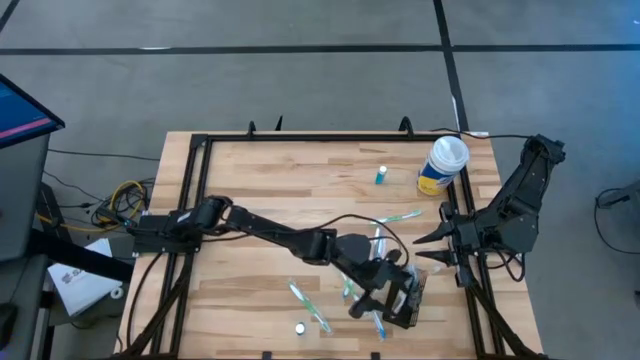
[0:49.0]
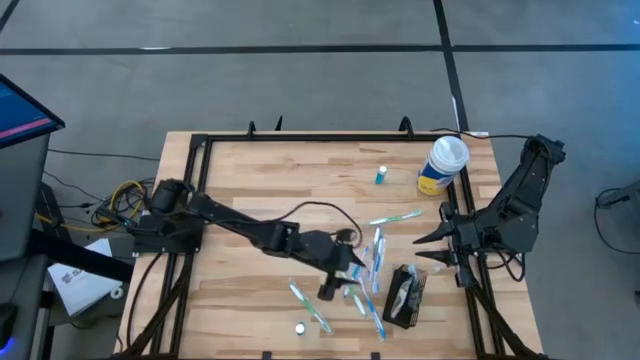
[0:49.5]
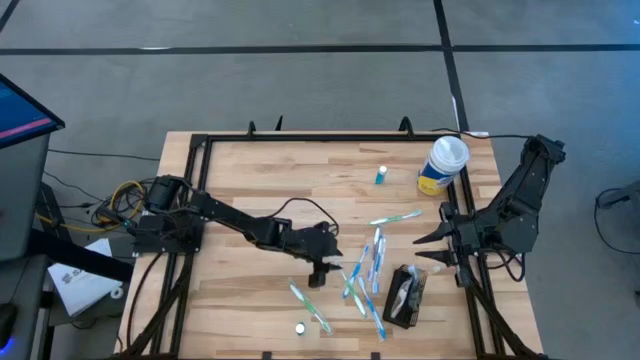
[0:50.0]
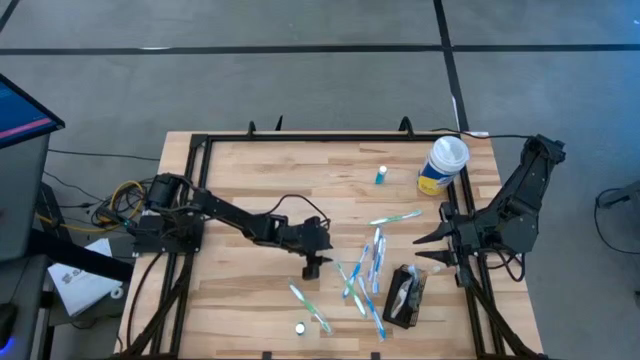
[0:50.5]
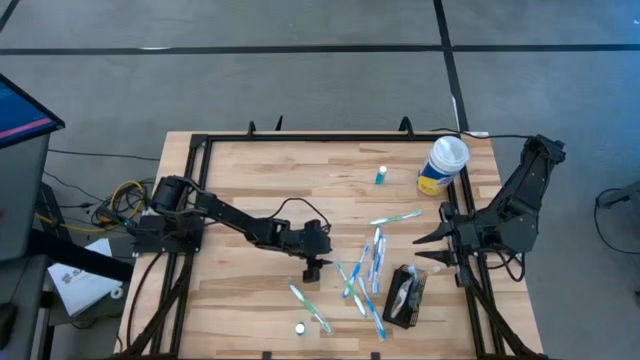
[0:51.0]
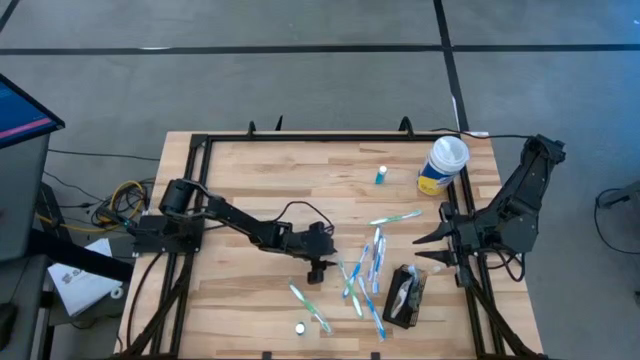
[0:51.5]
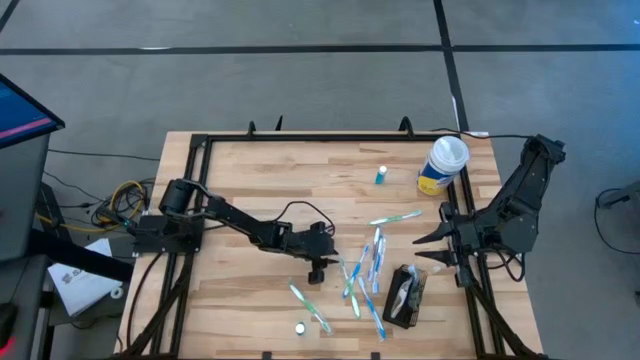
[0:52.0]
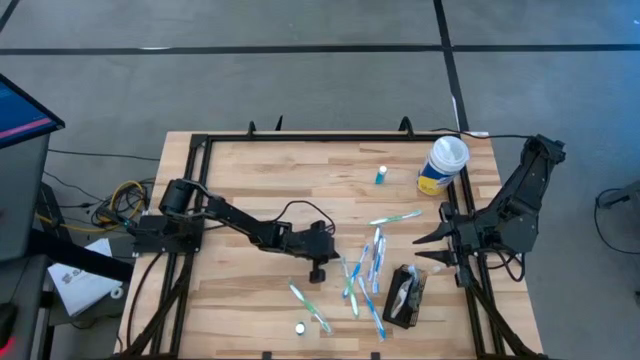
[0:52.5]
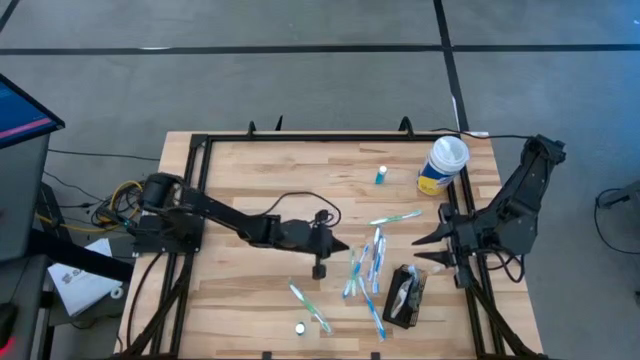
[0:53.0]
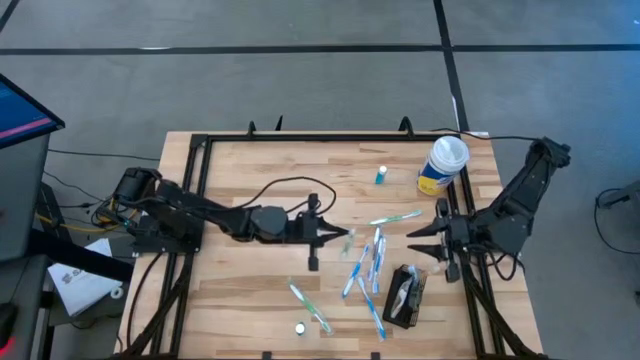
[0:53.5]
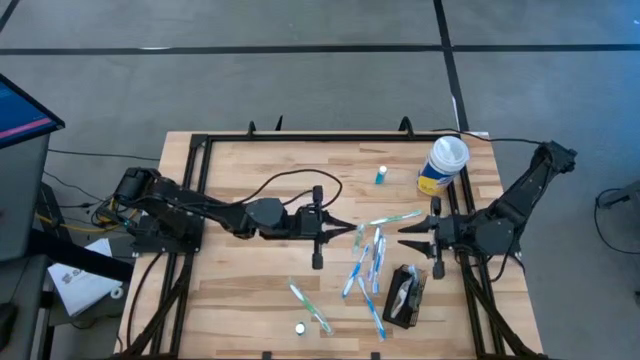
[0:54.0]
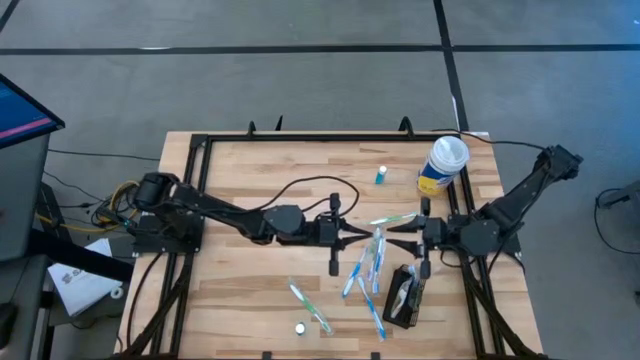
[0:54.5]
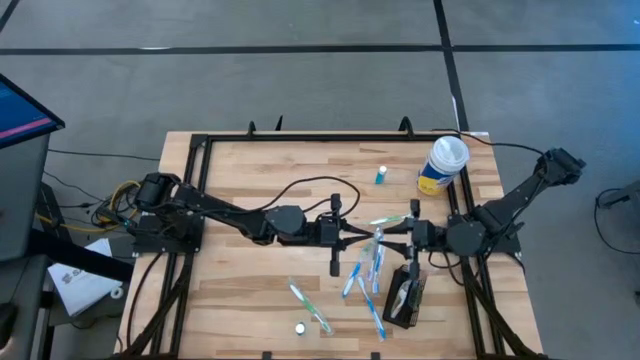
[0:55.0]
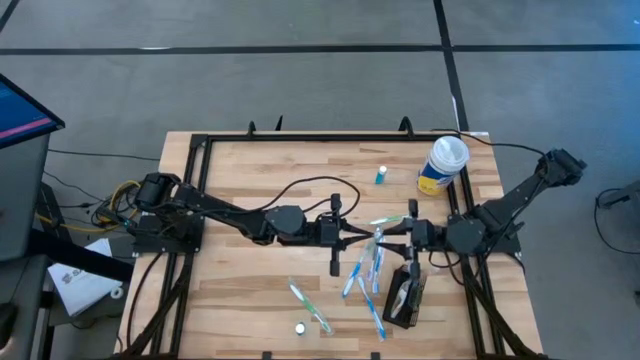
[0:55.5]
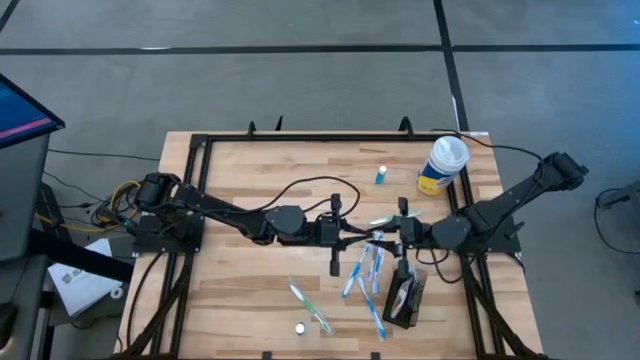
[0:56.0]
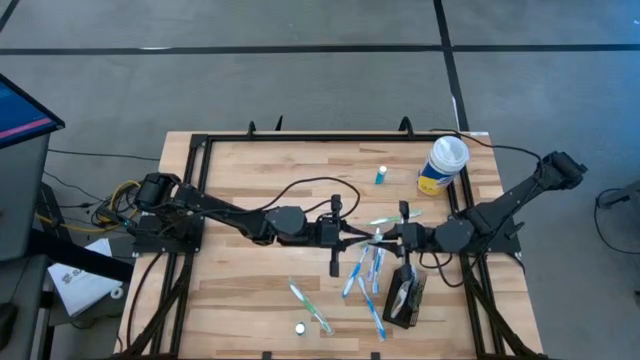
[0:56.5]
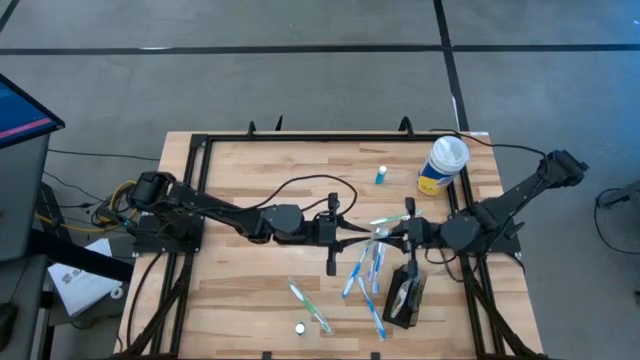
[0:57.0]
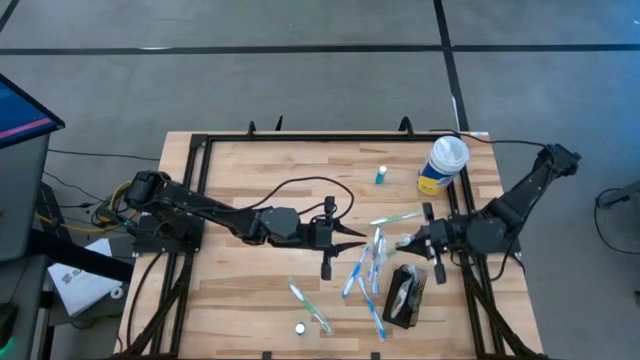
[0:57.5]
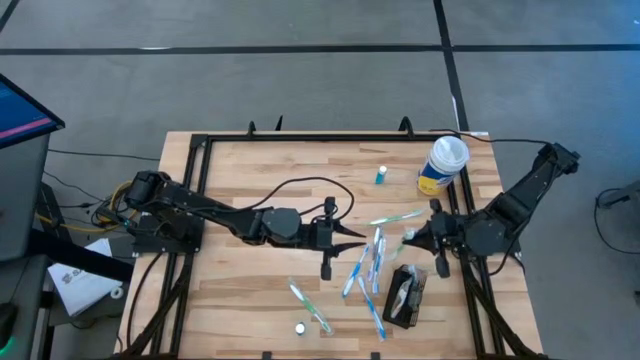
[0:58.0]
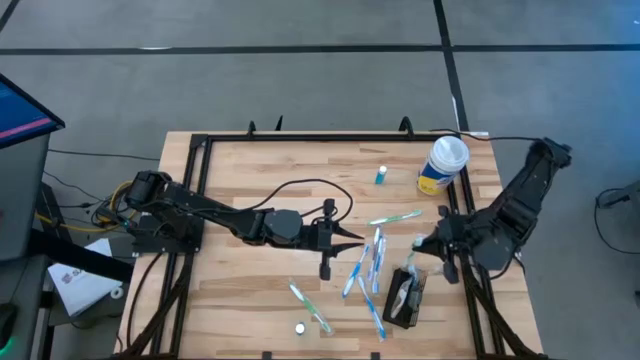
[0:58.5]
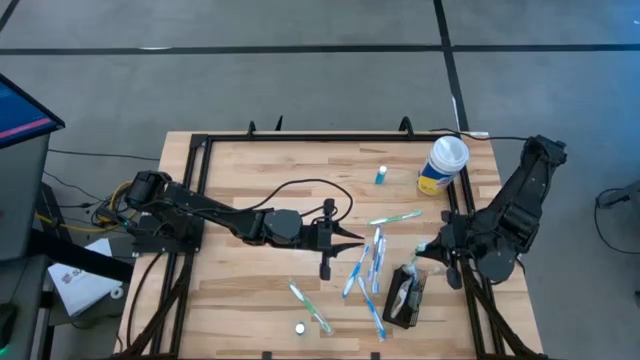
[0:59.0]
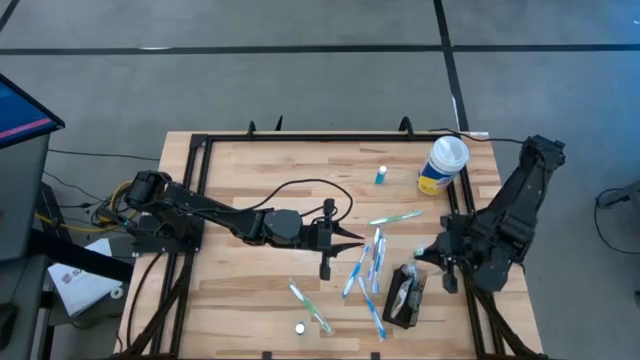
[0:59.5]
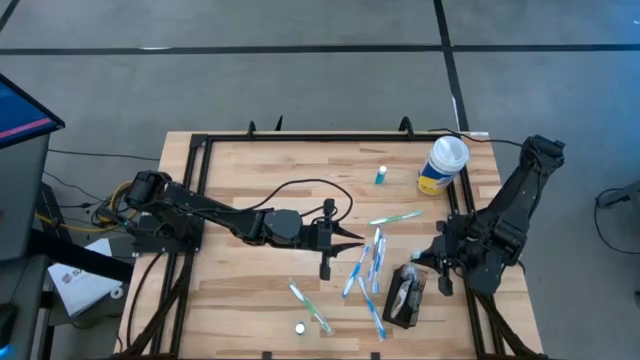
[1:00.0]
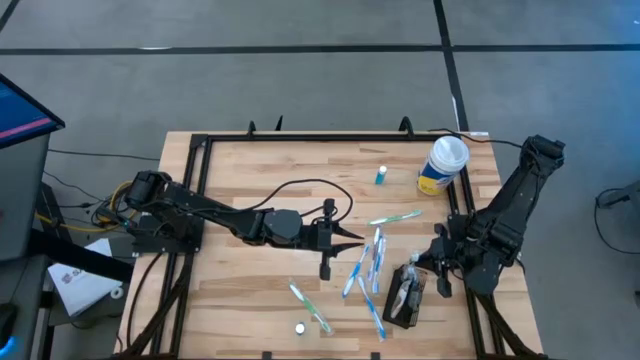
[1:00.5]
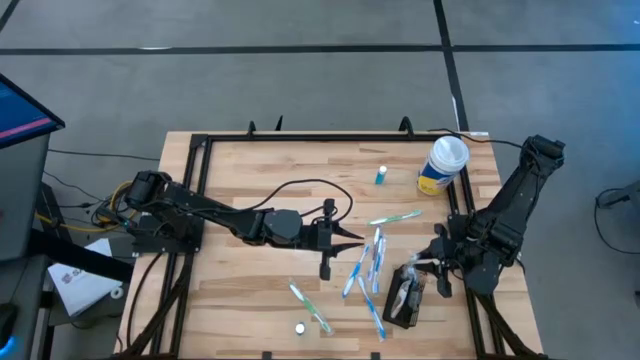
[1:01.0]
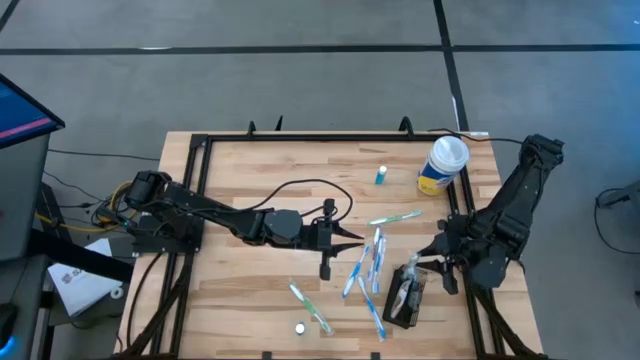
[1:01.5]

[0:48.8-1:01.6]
Task: Pick & Place toothbrushing station
Put the green toothbrush into the black wire organizer

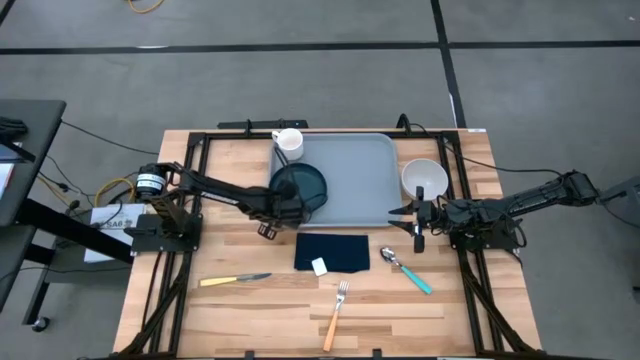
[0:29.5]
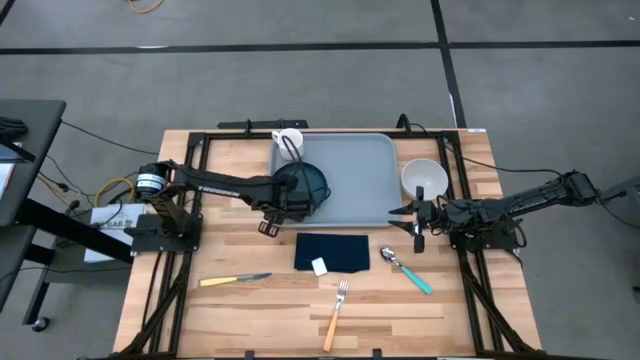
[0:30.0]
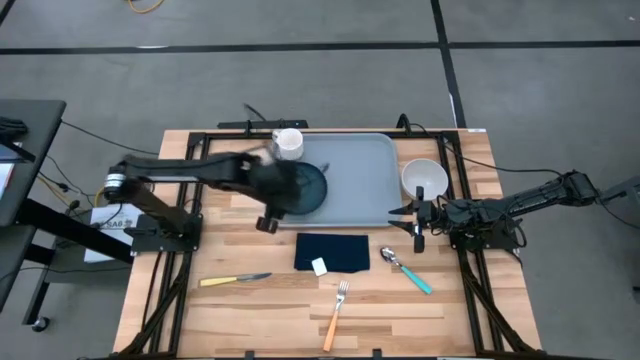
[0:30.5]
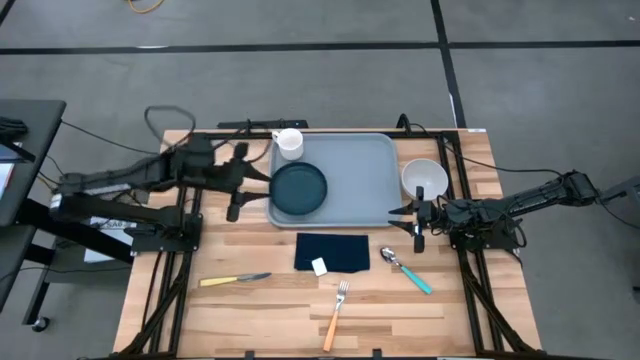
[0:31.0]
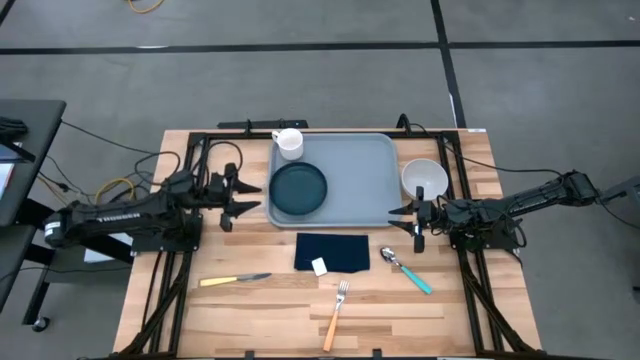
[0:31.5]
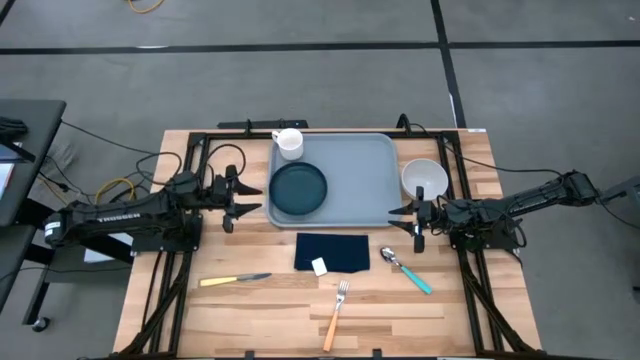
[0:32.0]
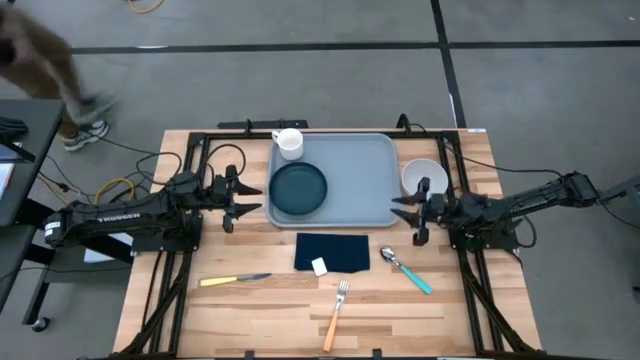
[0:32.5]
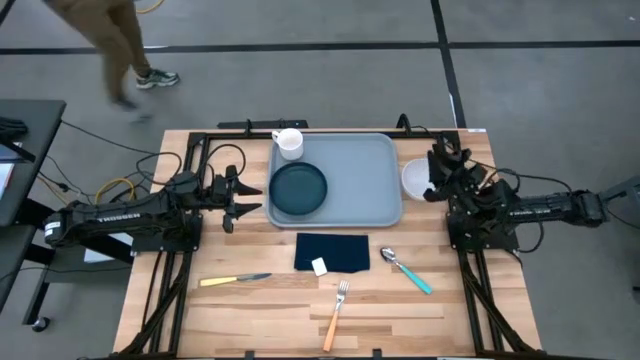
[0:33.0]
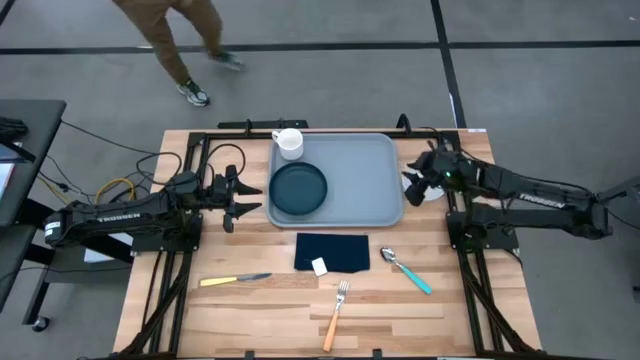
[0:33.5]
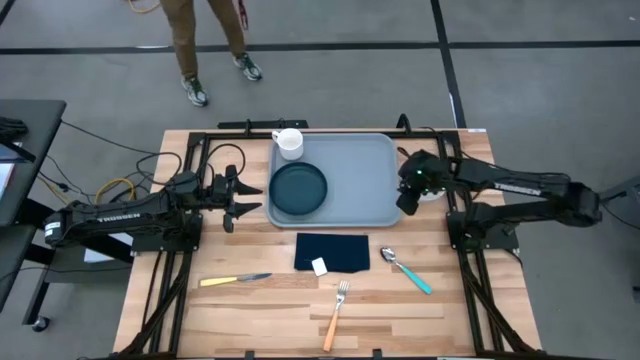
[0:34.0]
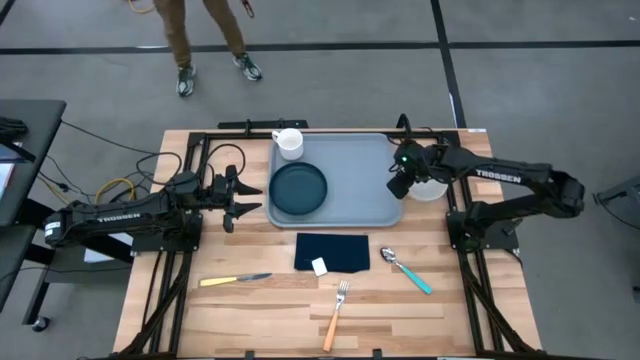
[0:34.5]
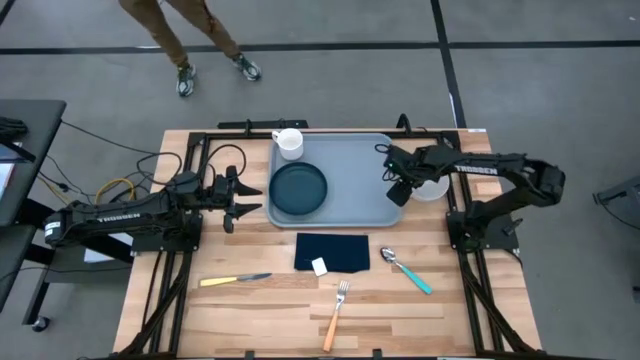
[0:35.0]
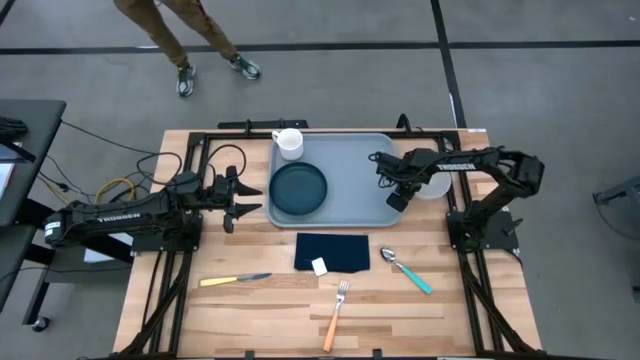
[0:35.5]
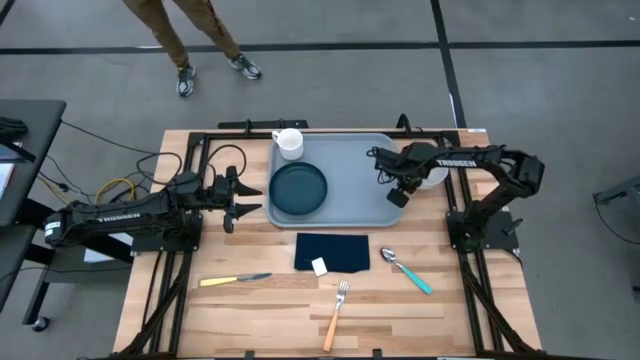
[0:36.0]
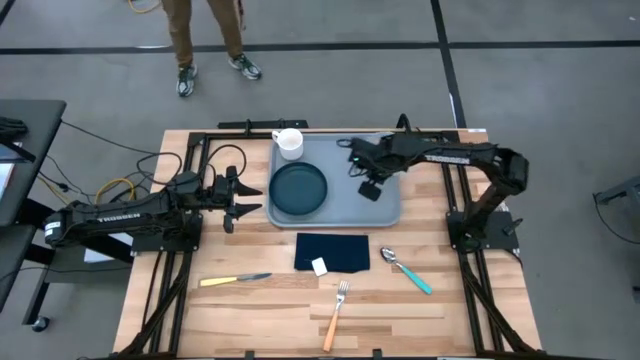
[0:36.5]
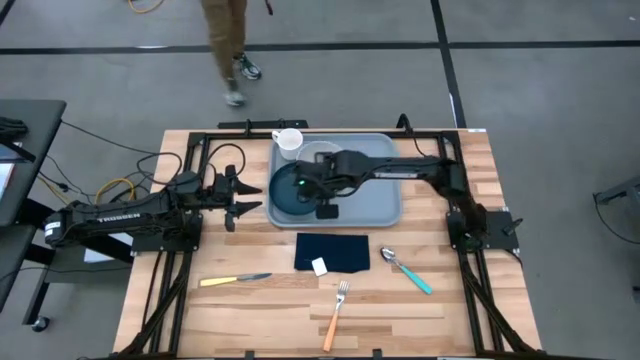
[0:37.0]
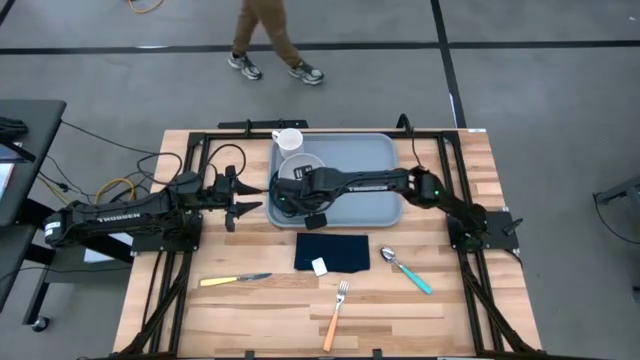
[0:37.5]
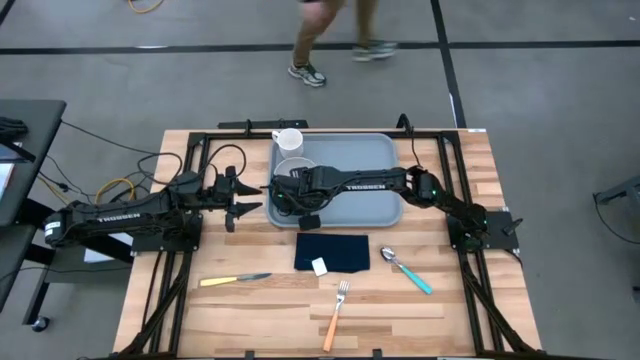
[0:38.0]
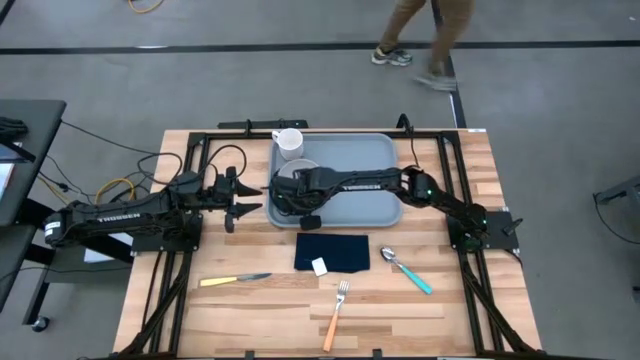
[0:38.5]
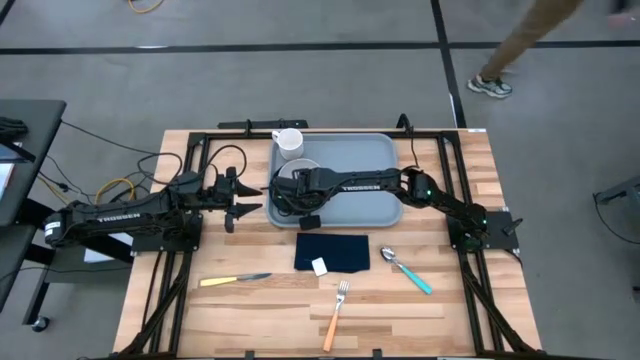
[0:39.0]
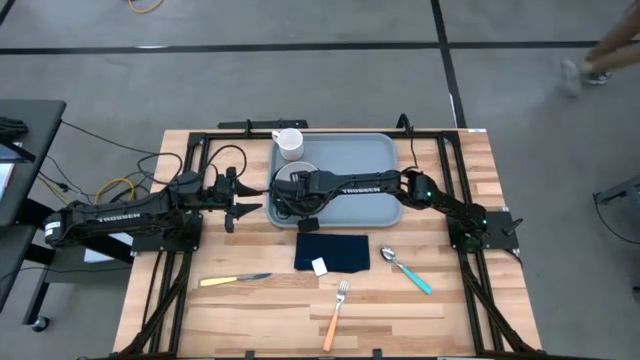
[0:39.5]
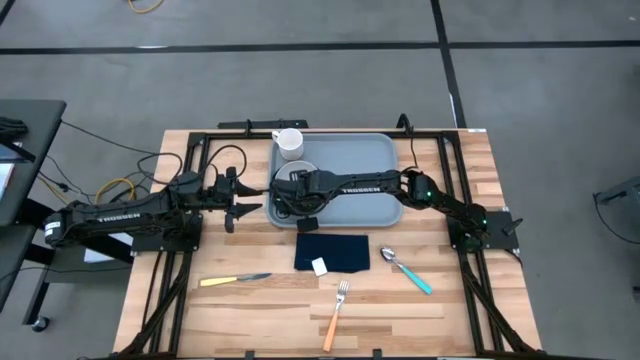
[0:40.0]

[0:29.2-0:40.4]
Task: Set up tray
Put the white bowl on top of the dark green plate on the gray serving tray
